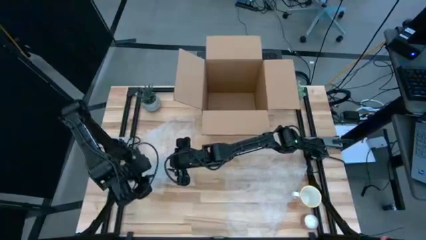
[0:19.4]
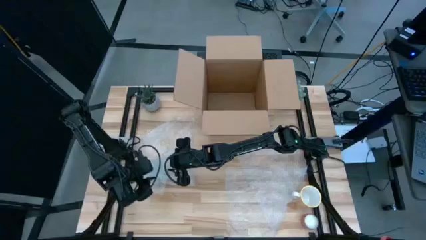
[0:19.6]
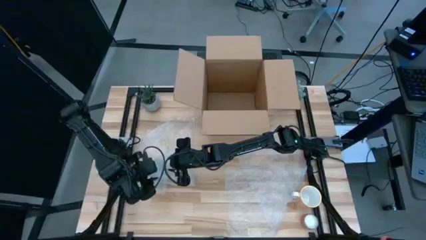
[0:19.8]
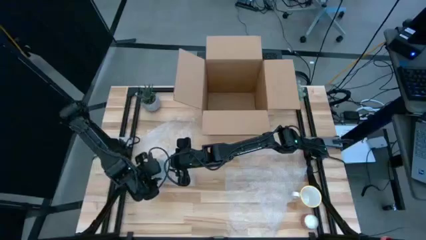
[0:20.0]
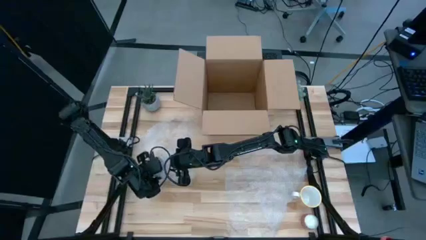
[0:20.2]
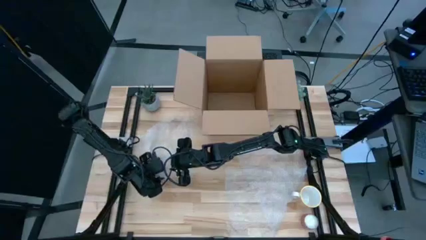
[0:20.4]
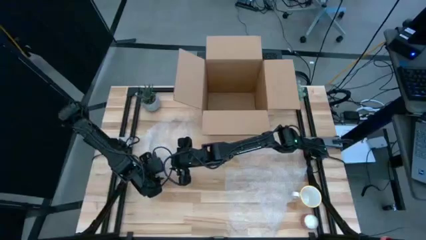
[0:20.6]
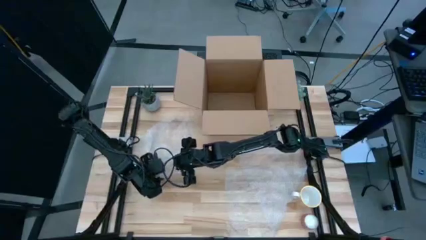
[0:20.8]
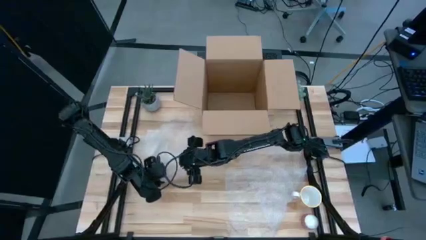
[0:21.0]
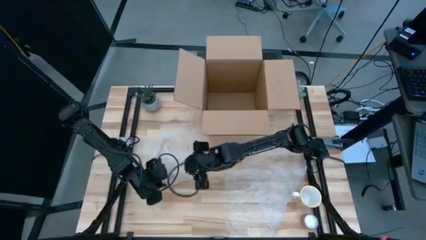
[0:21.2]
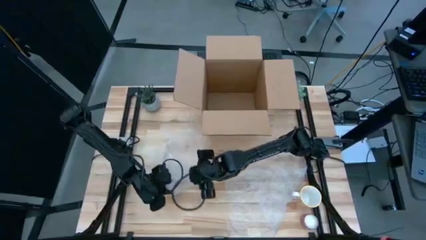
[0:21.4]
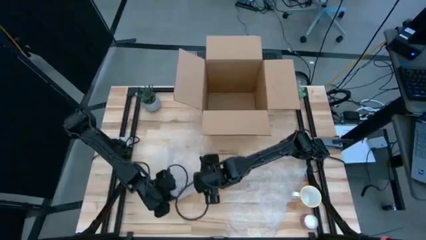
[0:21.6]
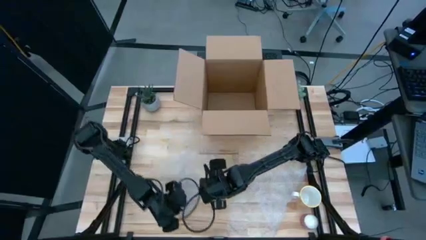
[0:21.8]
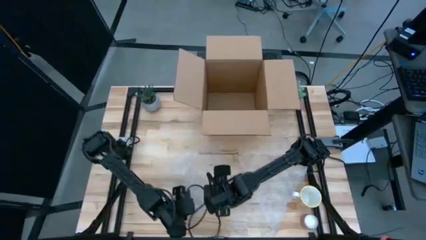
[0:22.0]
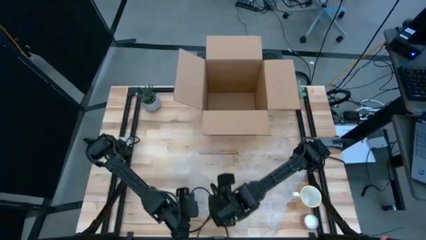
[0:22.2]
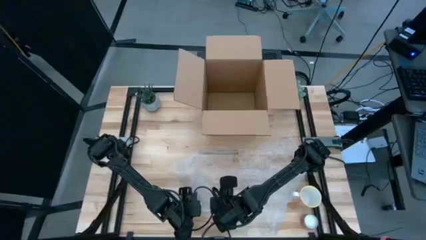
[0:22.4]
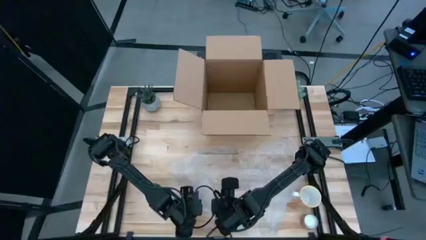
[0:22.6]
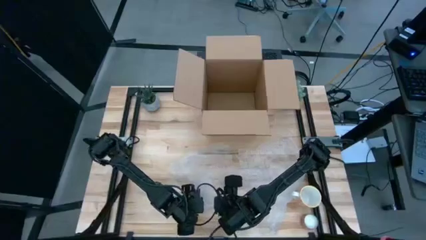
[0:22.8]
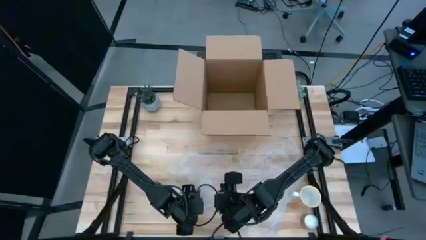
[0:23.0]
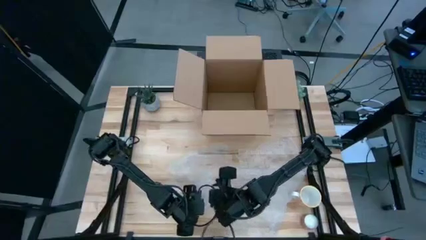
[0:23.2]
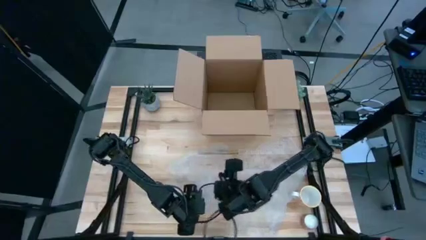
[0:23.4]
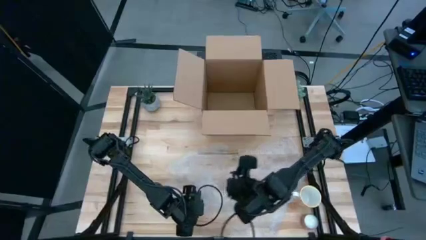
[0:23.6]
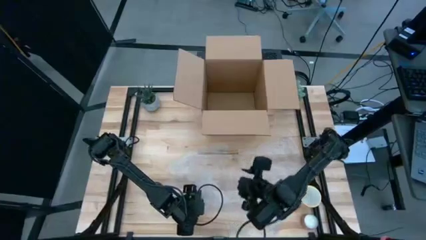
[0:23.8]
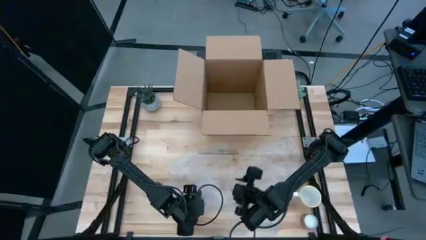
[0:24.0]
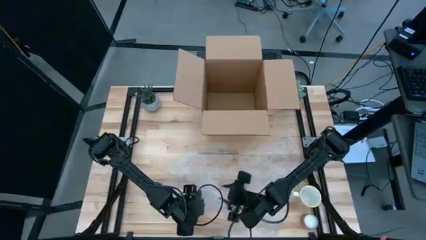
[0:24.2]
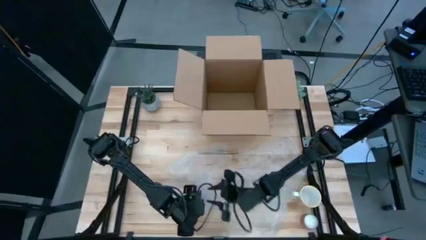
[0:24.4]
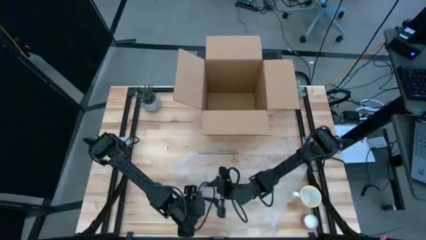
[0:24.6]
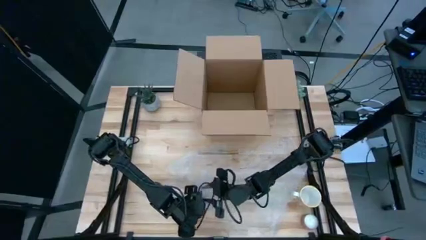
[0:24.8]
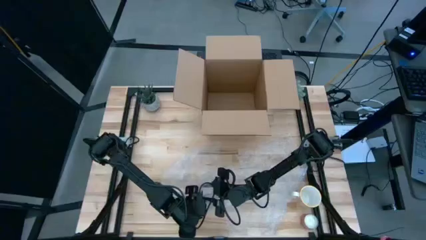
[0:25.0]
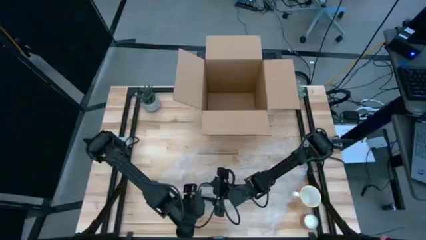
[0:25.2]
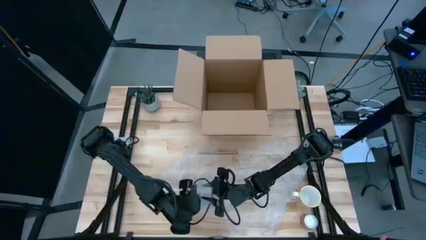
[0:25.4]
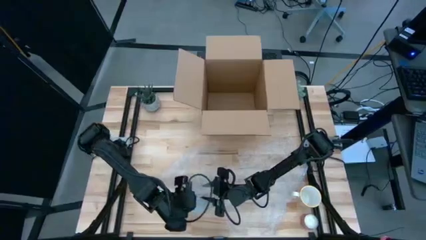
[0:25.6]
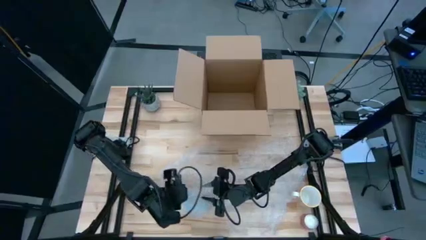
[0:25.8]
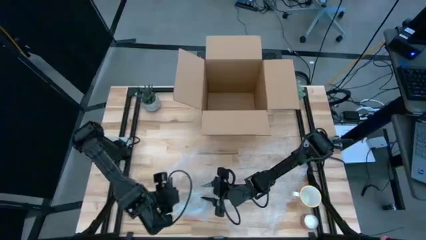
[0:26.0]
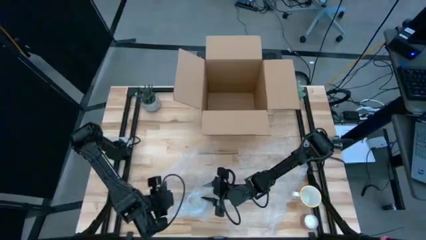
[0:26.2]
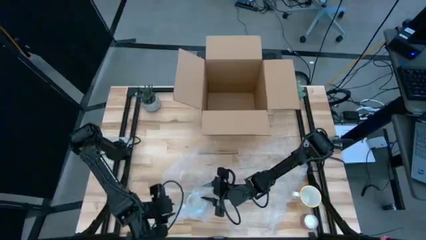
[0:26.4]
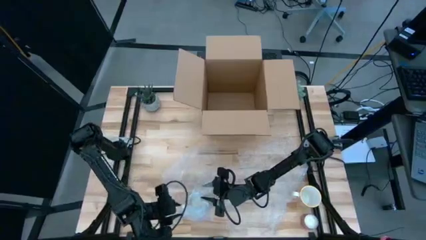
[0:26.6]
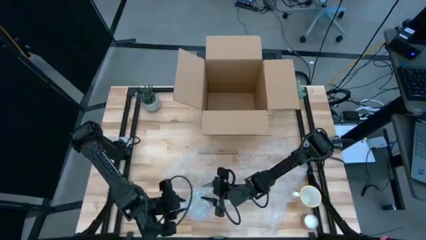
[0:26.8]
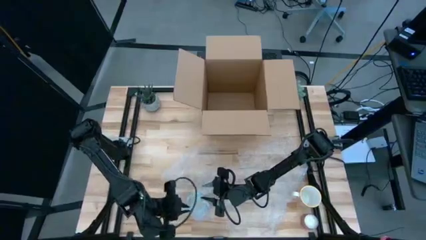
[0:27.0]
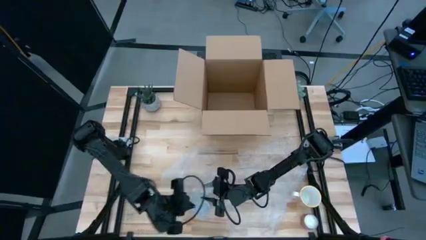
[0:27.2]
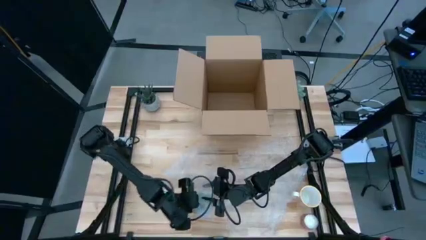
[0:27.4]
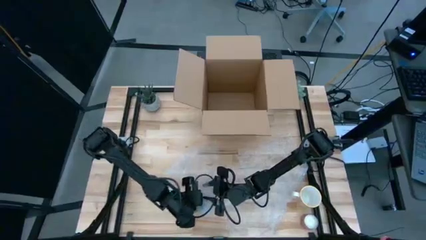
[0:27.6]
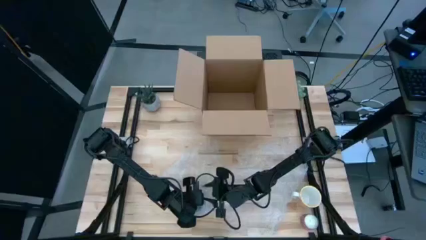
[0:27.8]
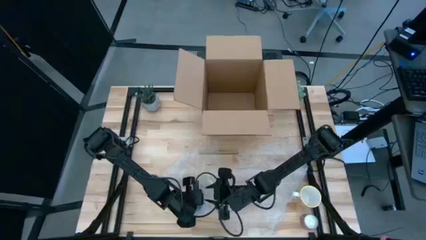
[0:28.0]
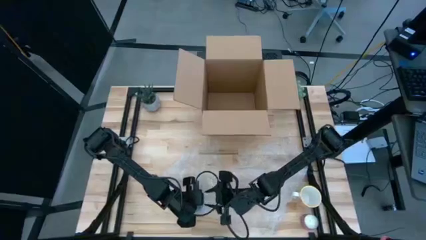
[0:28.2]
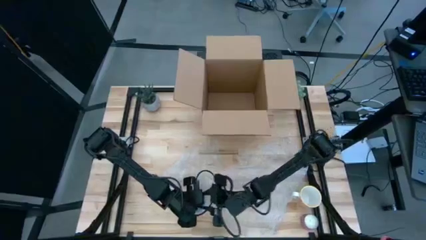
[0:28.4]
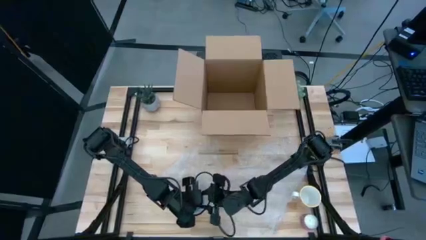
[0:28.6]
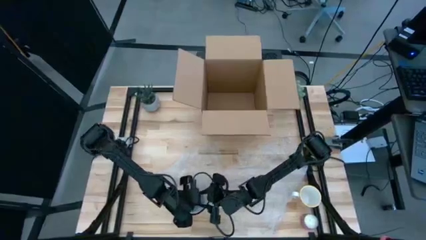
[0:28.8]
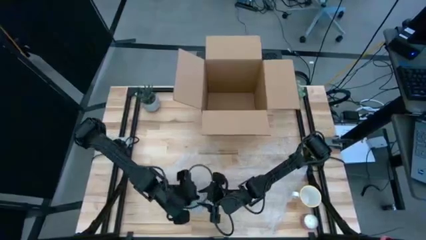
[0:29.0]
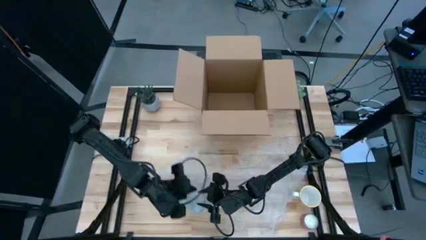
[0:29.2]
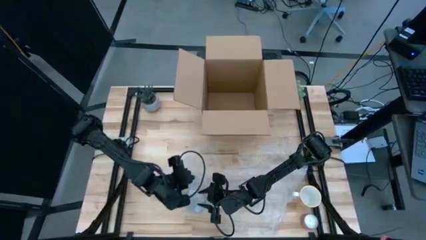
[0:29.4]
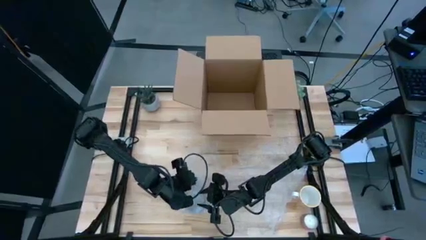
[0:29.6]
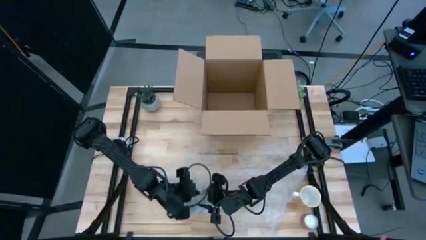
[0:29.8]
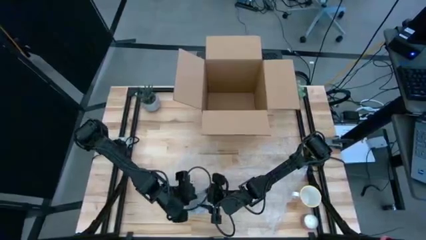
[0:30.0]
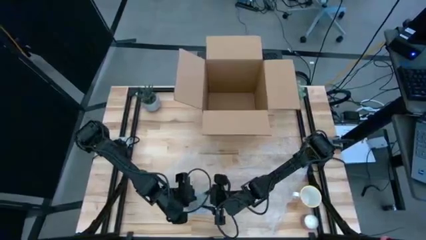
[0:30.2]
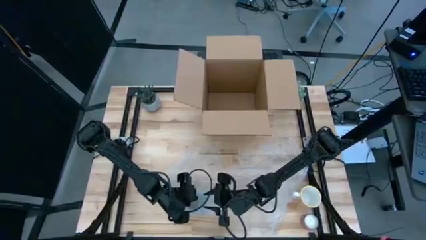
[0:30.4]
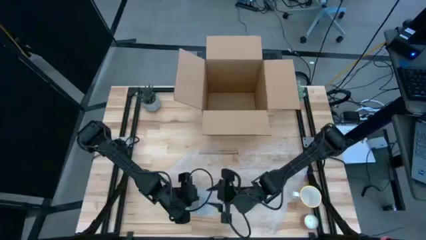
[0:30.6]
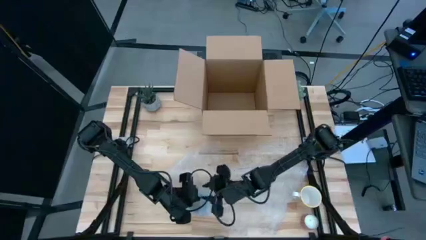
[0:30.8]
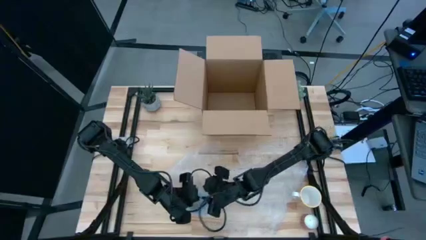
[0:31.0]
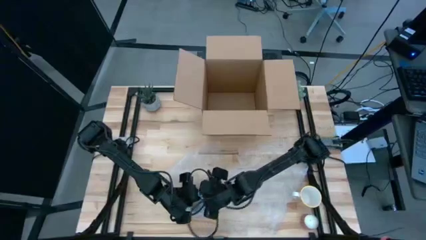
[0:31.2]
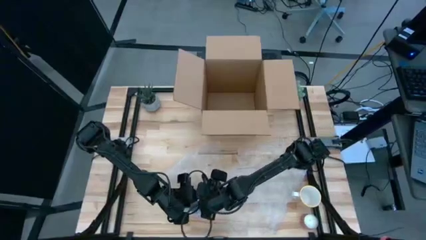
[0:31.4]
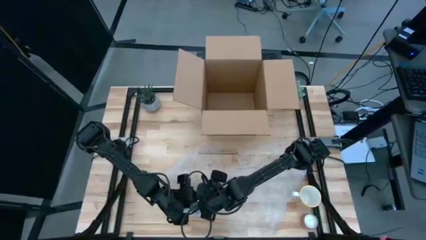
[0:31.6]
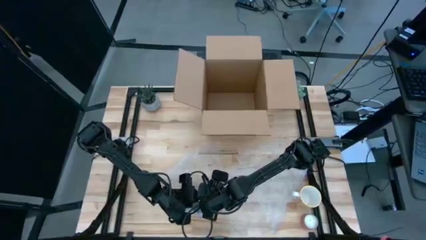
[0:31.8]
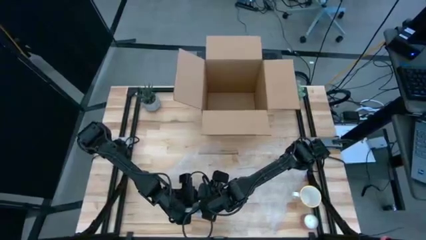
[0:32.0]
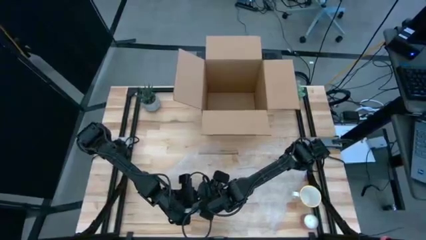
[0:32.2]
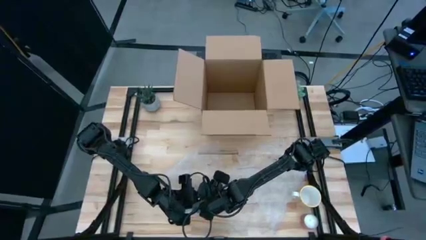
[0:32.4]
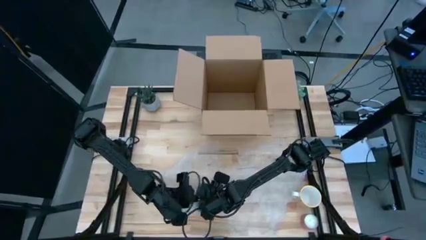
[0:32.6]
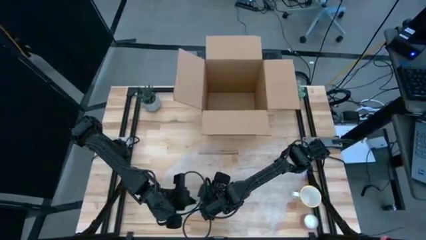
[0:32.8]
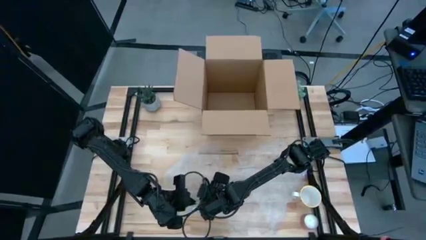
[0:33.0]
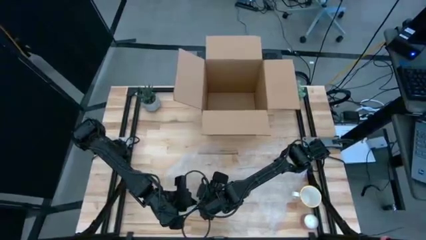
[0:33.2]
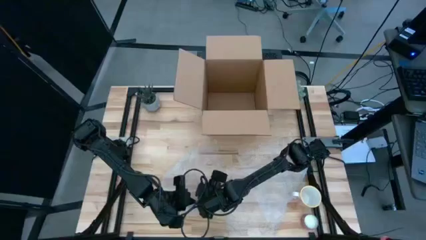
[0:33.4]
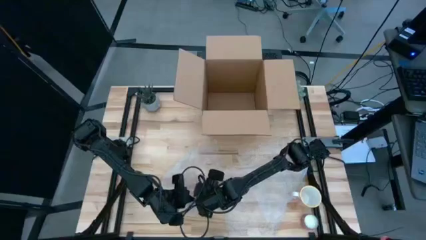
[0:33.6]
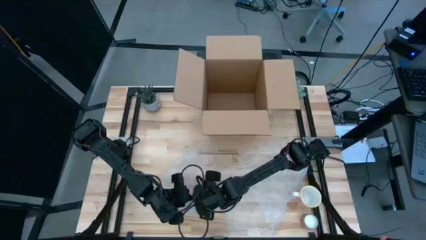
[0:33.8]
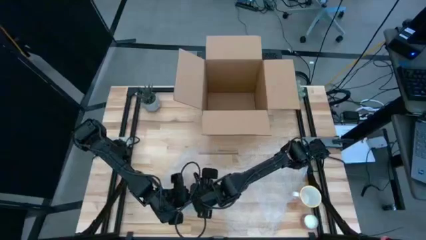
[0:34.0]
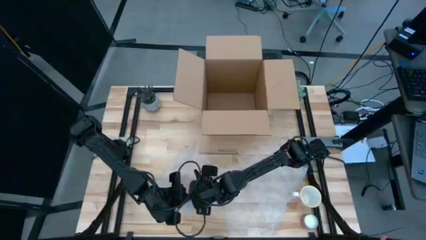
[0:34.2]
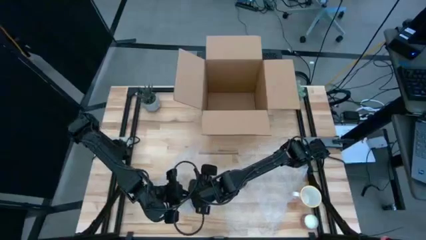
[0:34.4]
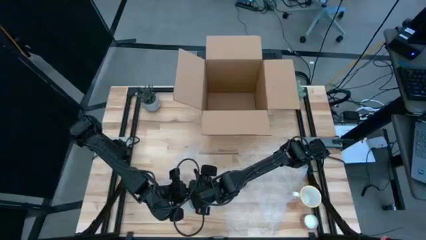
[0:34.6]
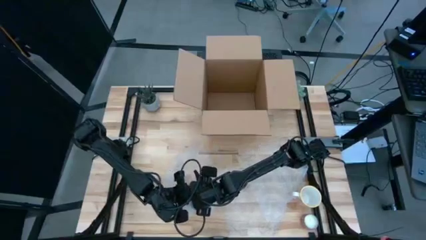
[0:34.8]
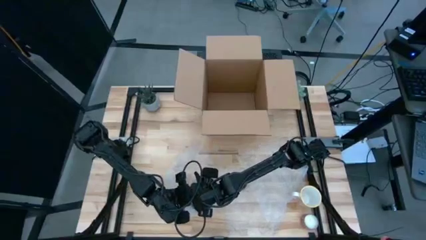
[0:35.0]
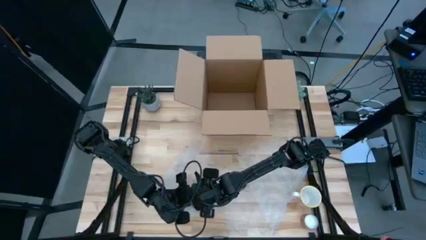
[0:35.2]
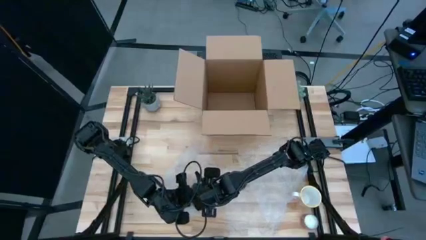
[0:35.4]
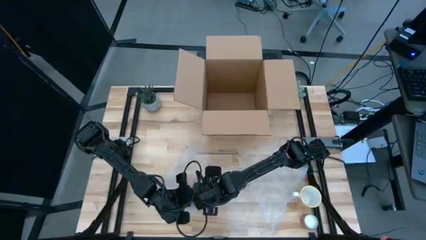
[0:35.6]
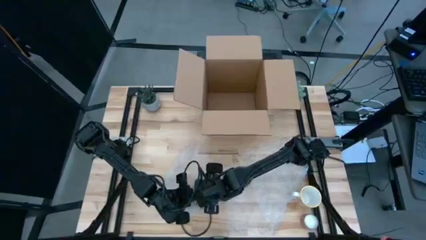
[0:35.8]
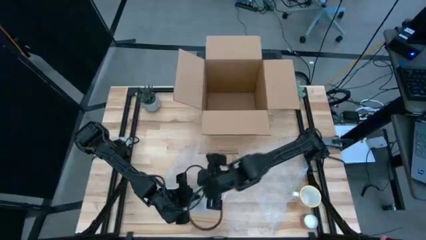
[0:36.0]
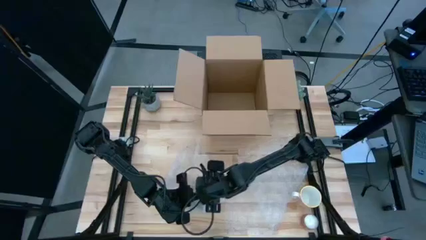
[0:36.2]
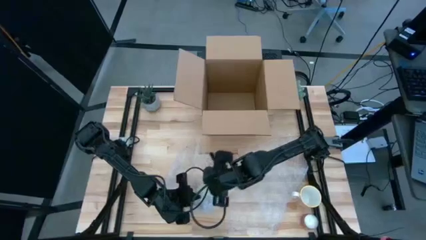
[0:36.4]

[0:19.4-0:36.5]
Task: wrap mug
Wrap the red patterned mug with the left transparent bubble wrap
